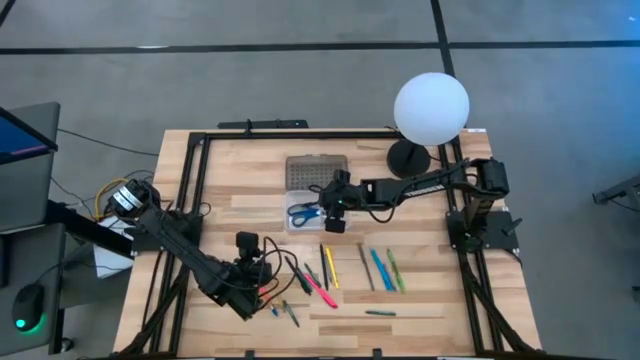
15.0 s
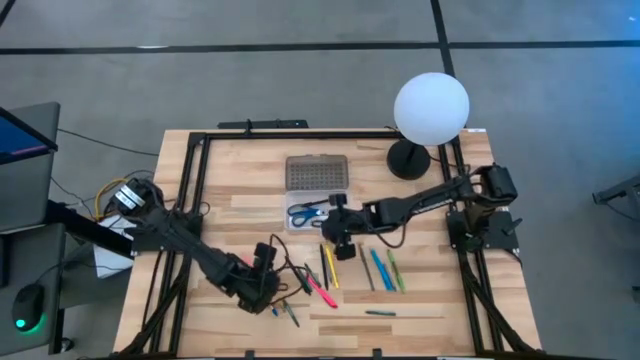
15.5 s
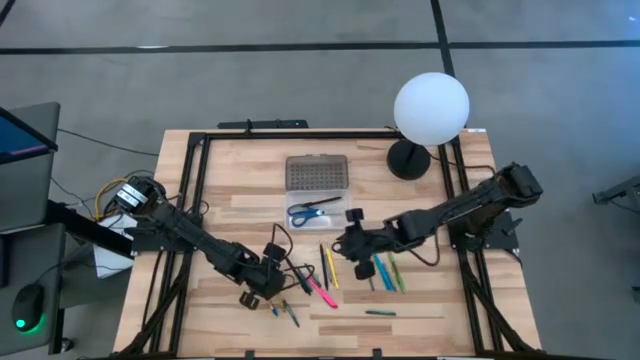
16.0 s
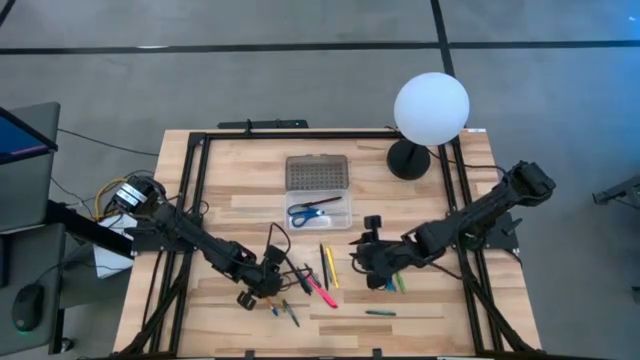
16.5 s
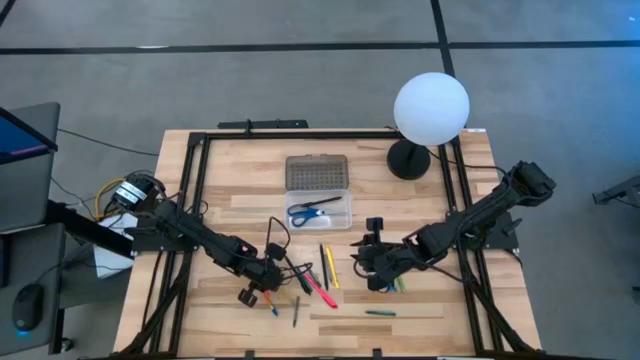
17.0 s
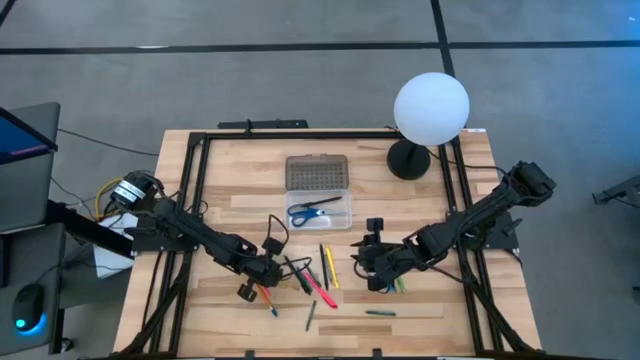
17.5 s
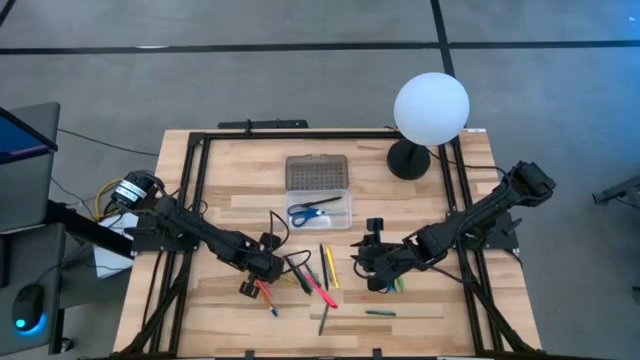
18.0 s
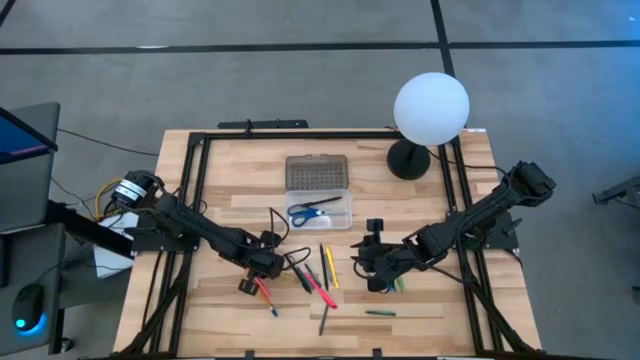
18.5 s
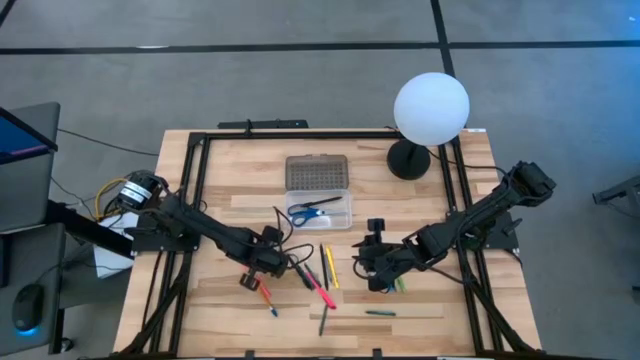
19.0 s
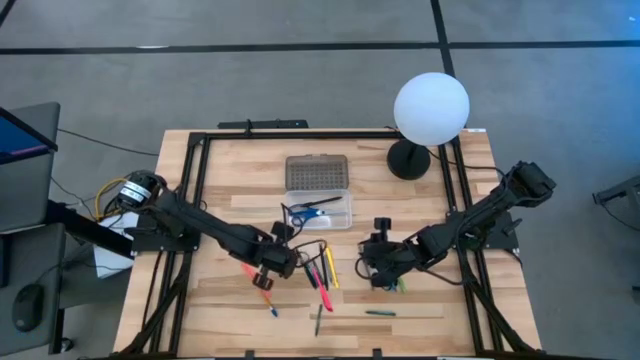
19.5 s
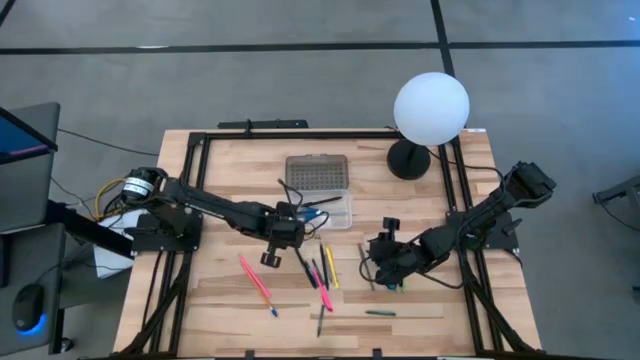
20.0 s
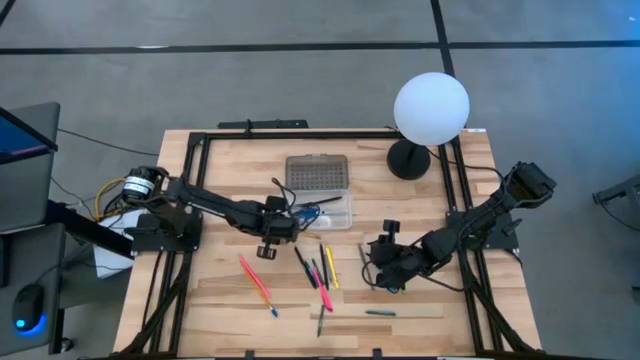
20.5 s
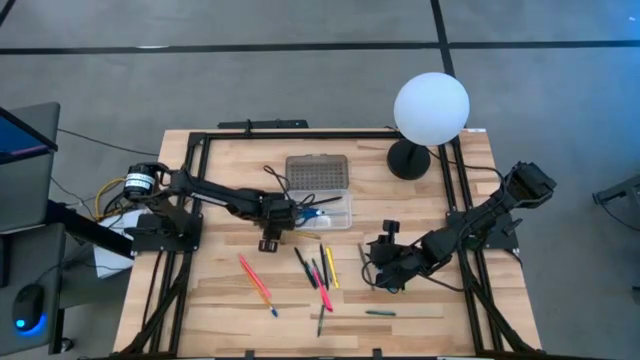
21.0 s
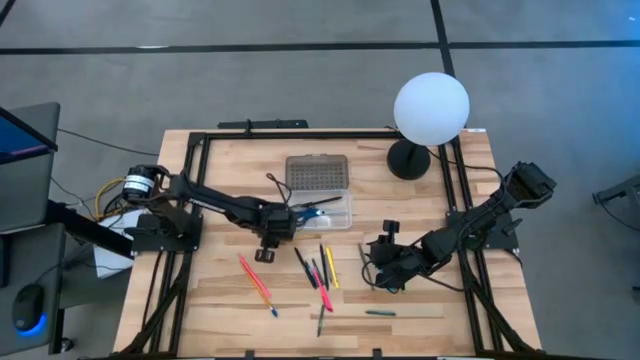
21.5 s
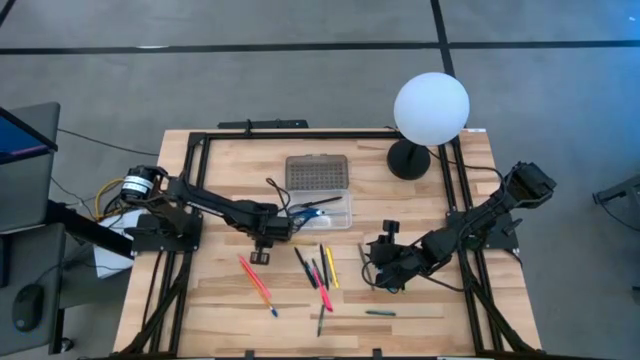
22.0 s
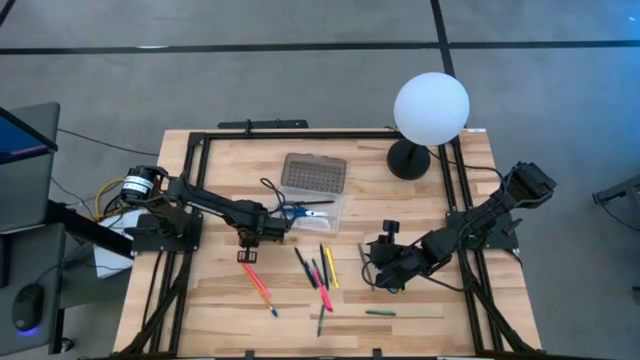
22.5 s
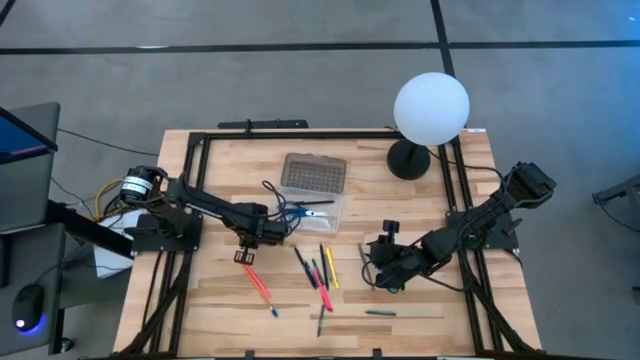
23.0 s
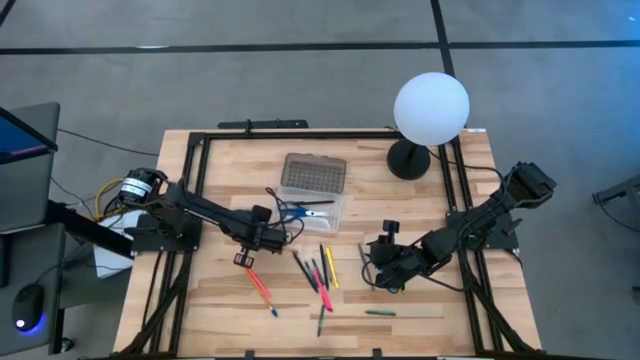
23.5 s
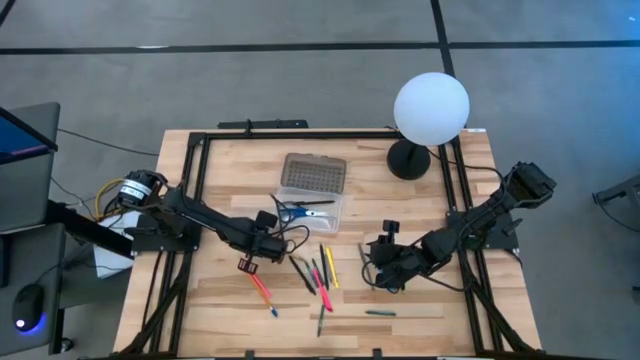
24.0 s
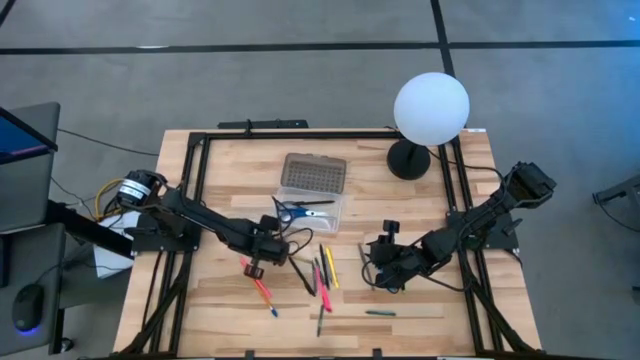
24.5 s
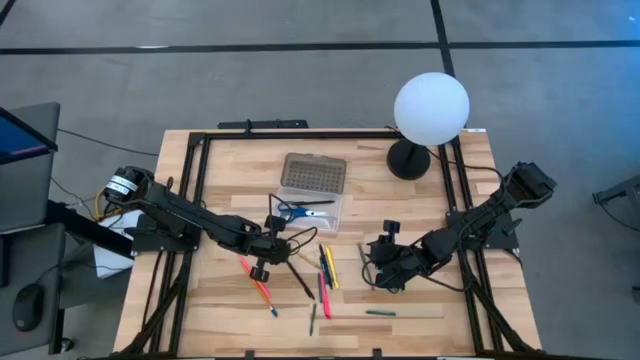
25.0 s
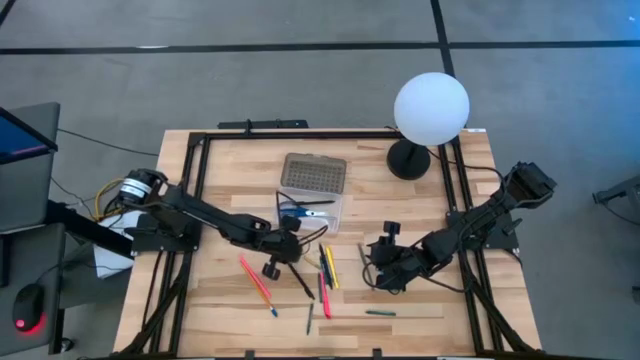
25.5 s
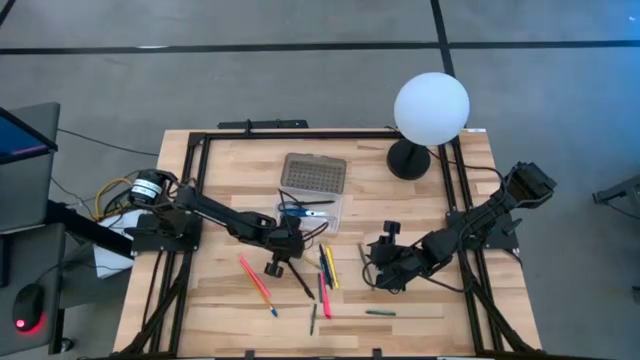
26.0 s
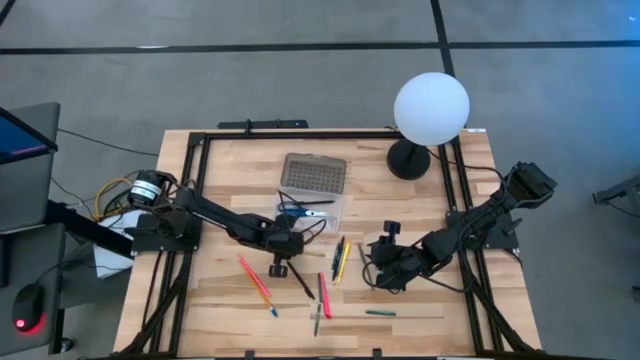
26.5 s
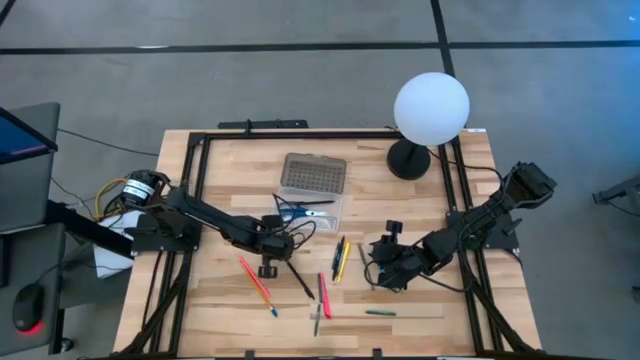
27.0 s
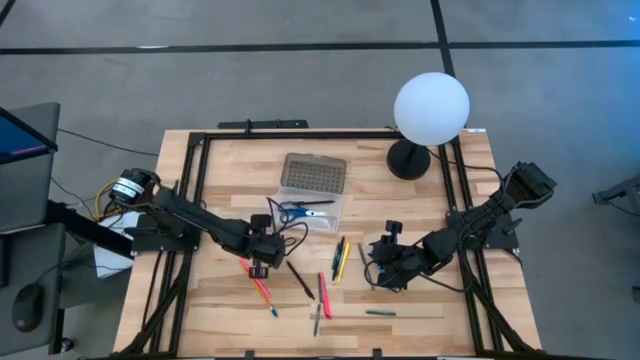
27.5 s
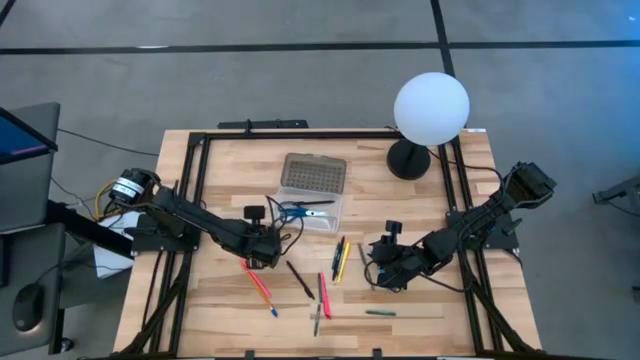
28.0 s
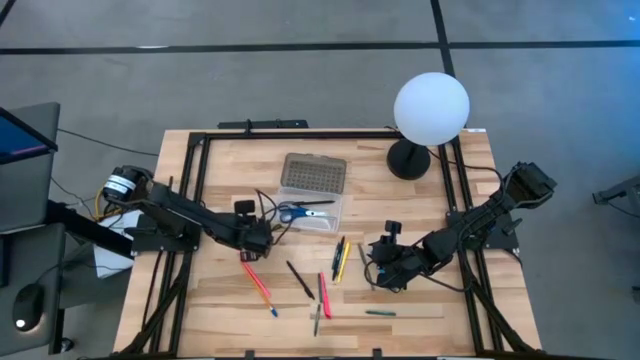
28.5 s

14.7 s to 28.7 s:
Task: Pick & place school supplies into a supply box
Put the yellow pencil into the gray supply box

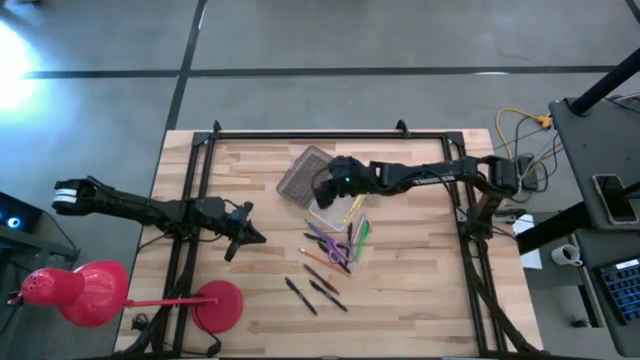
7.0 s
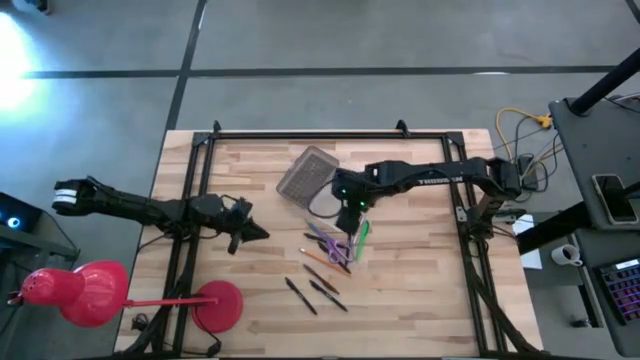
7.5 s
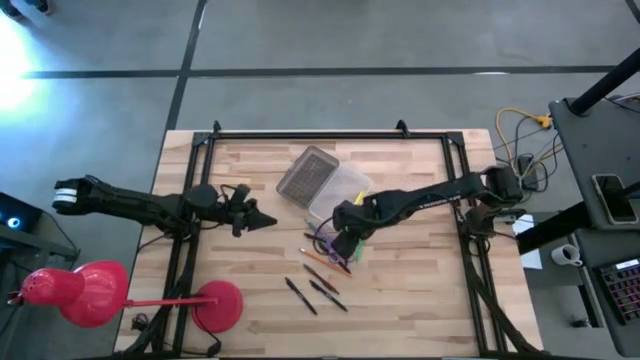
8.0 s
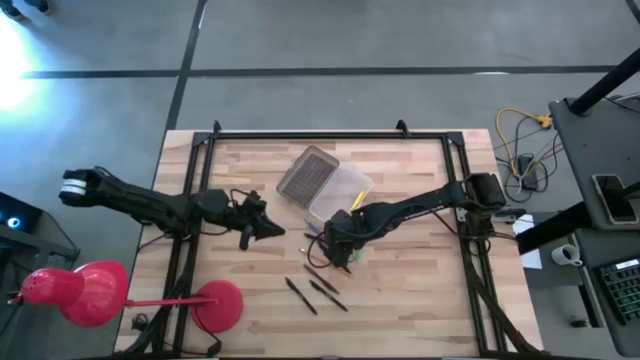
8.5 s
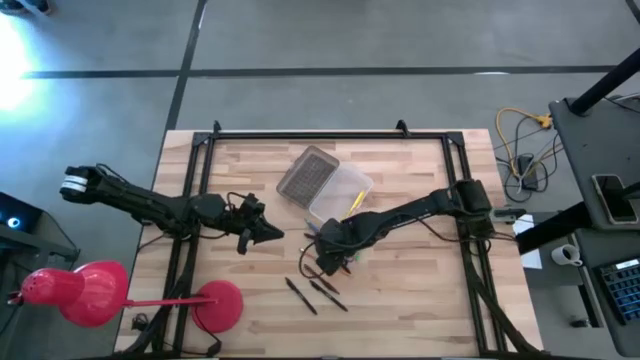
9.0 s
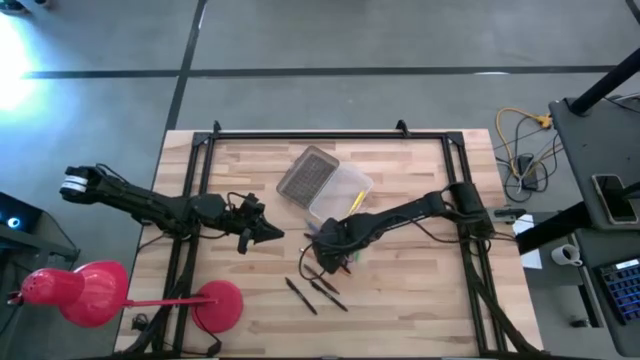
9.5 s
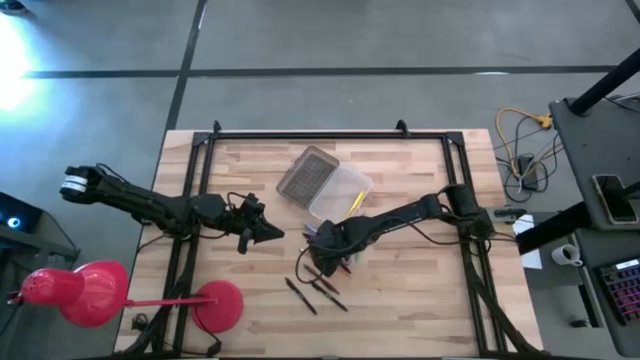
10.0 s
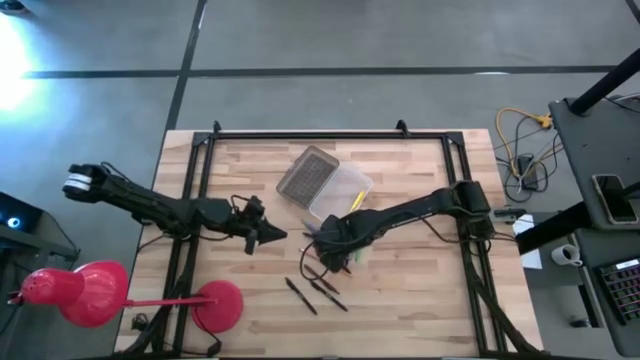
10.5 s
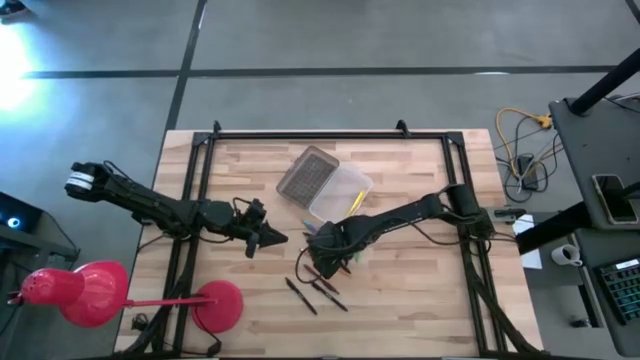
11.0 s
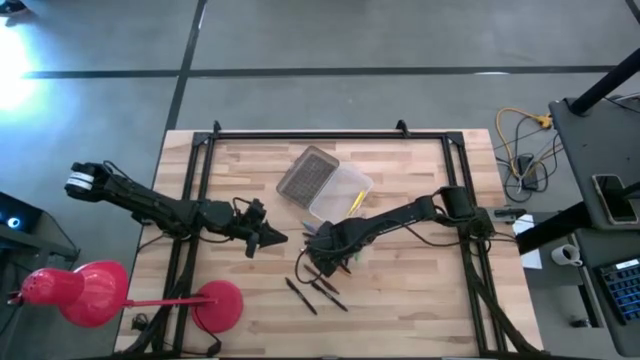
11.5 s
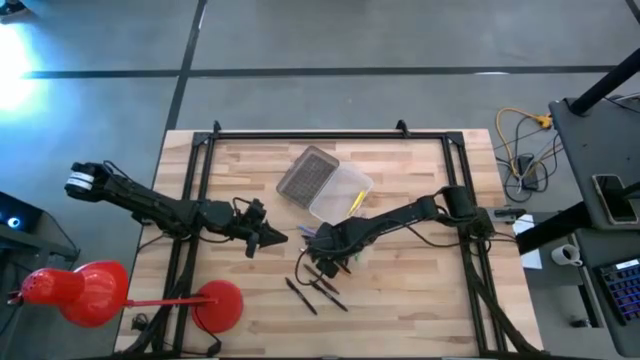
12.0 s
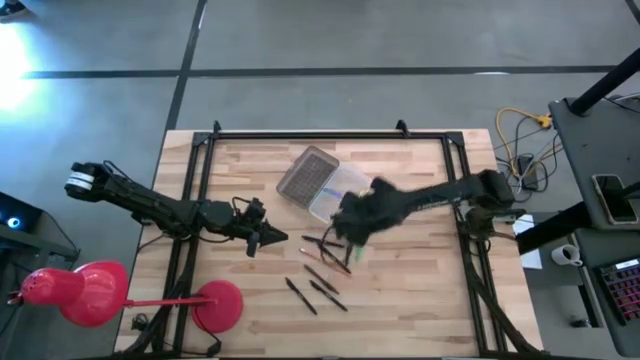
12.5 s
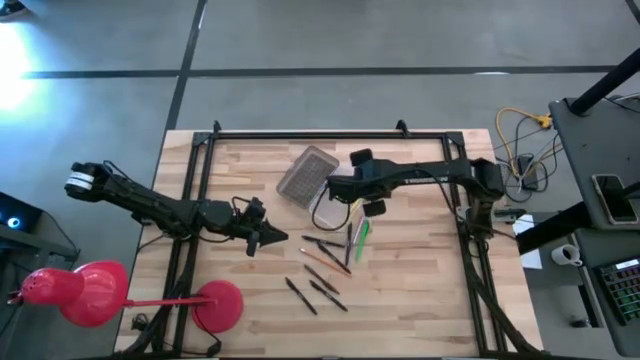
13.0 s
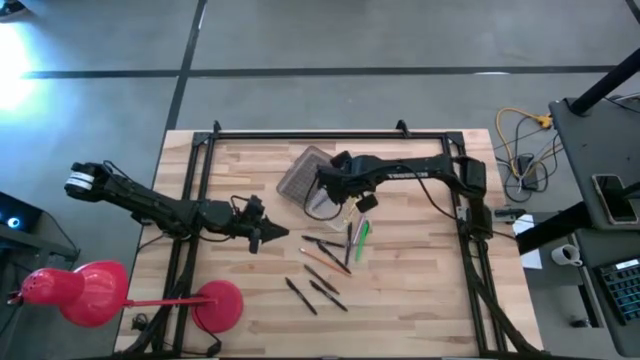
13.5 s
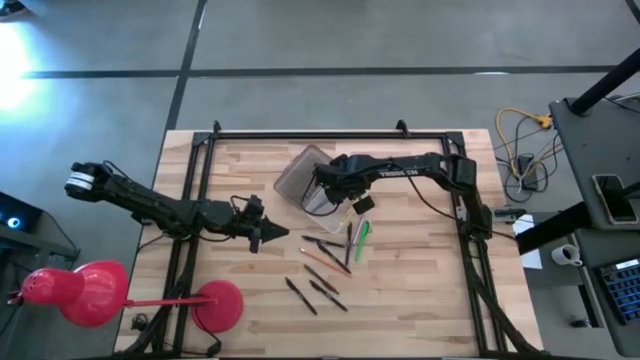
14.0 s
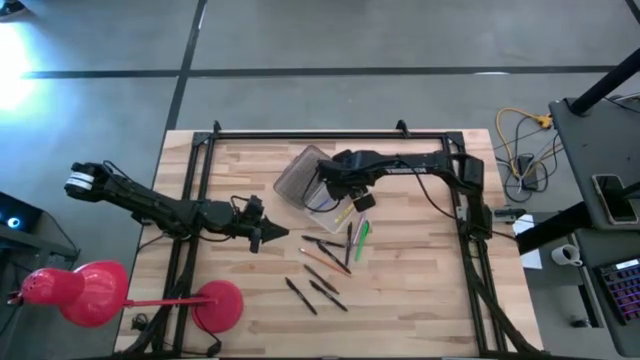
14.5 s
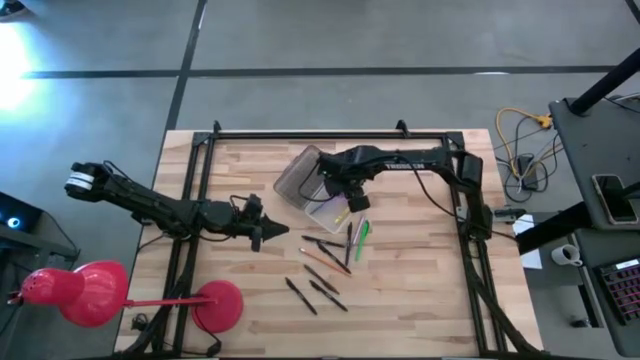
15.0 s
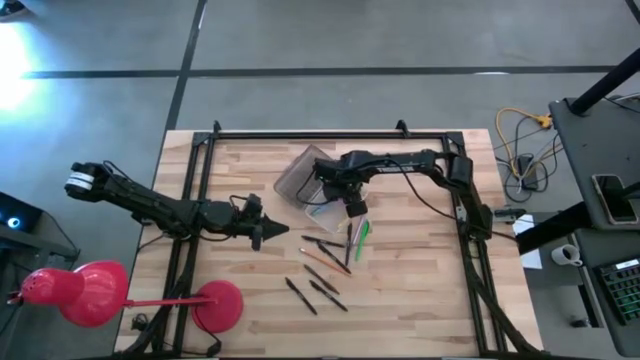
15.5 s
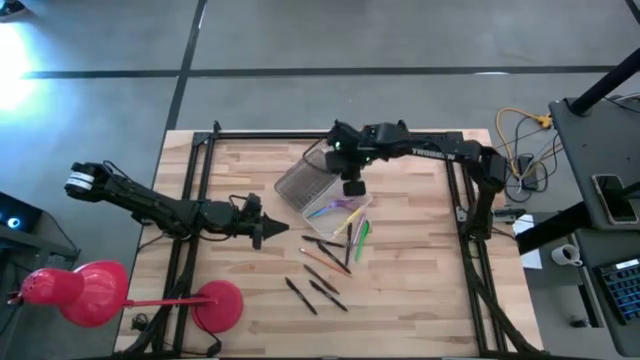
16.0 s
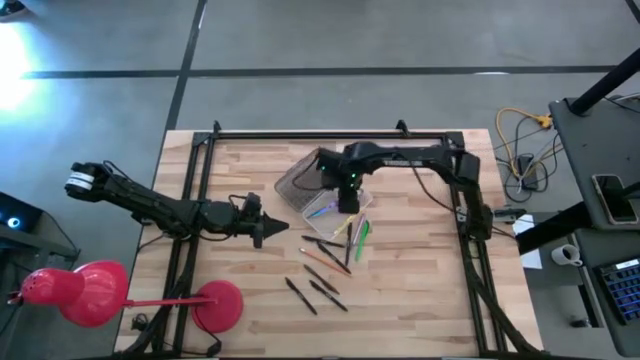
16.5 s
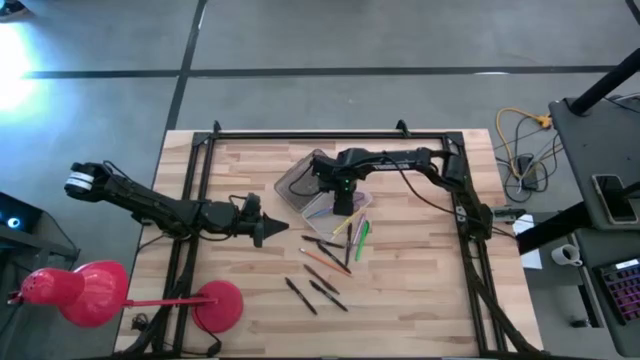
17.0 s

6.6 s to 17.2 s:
Task: Pick & place school supplies into a supply box
Put the purple scissors into the supply box
